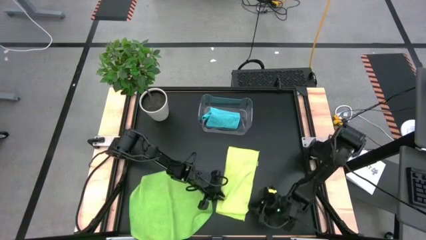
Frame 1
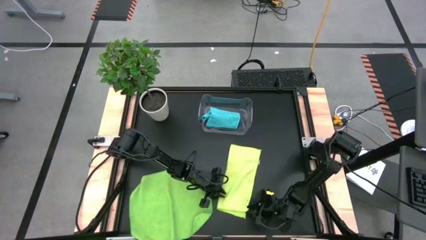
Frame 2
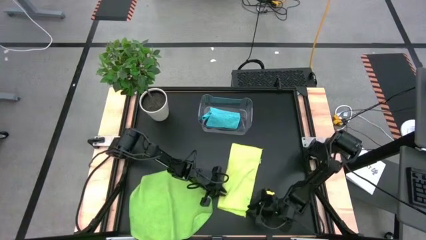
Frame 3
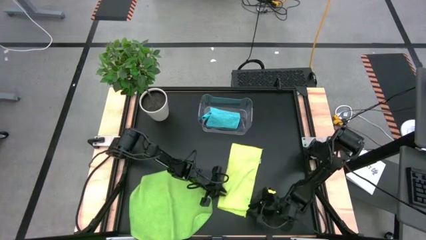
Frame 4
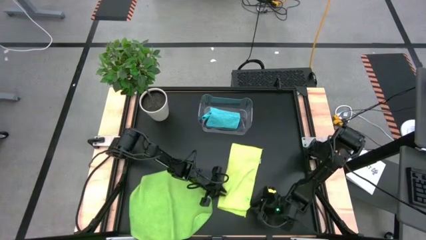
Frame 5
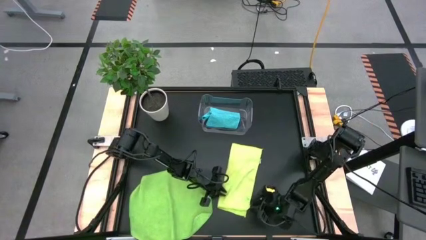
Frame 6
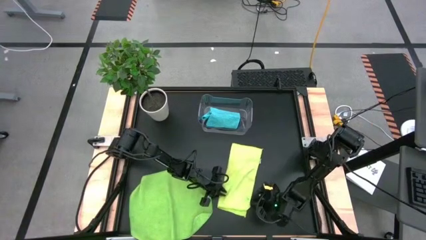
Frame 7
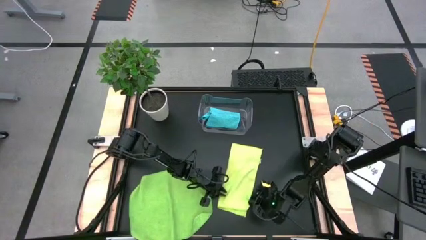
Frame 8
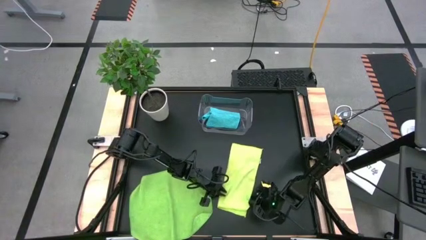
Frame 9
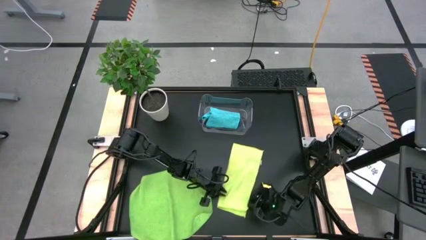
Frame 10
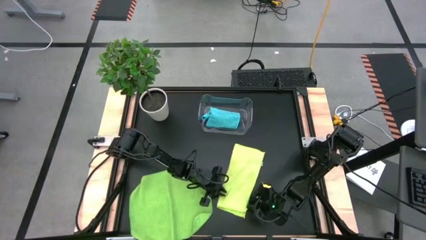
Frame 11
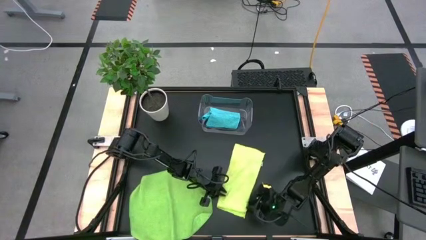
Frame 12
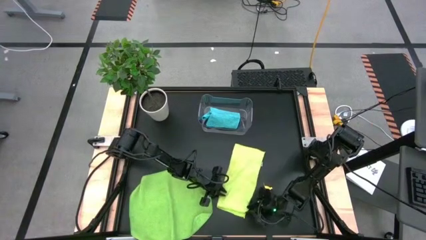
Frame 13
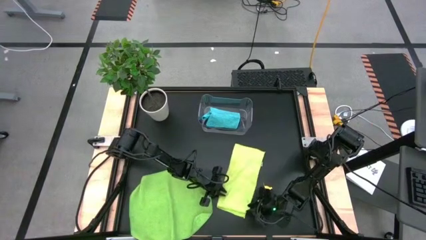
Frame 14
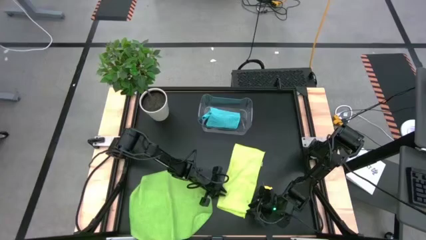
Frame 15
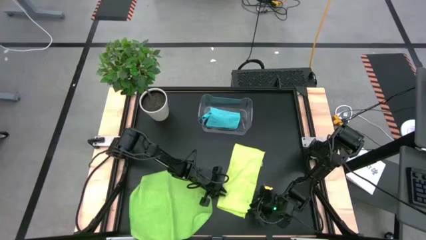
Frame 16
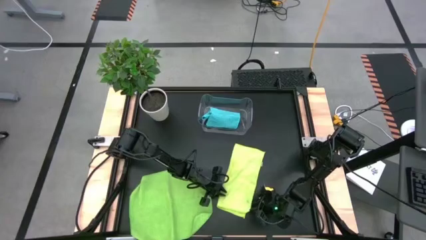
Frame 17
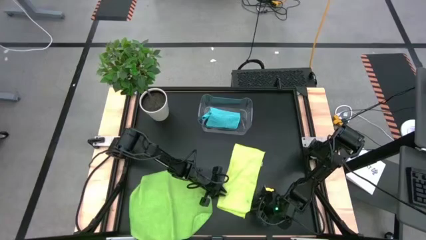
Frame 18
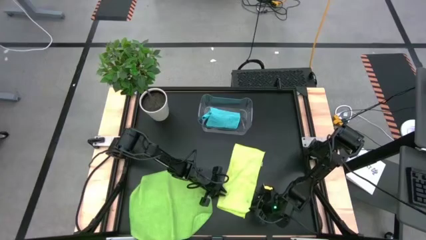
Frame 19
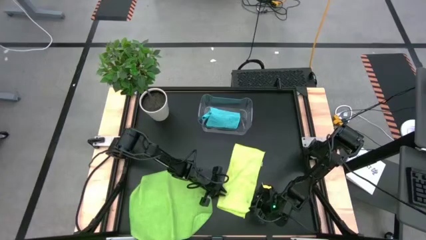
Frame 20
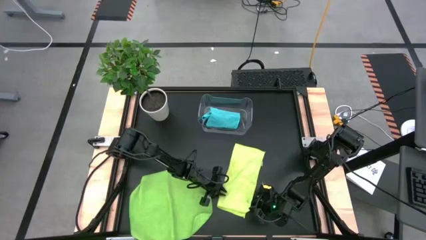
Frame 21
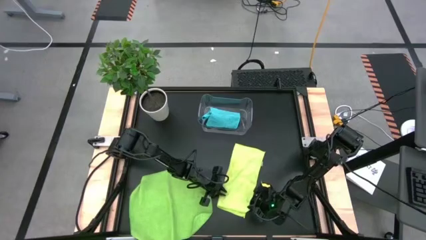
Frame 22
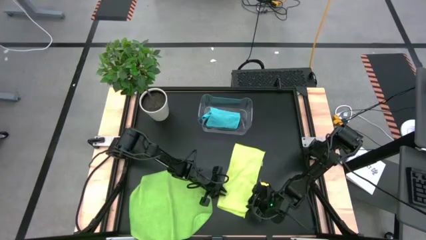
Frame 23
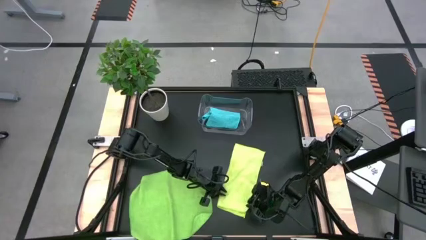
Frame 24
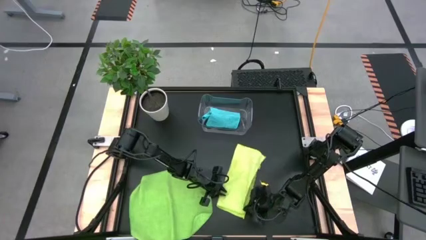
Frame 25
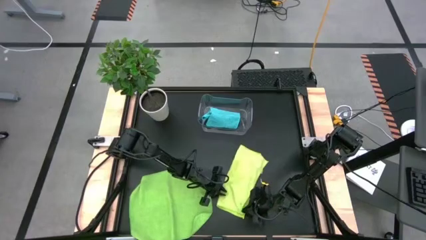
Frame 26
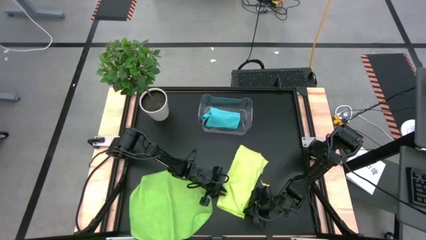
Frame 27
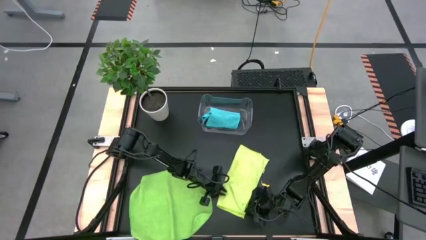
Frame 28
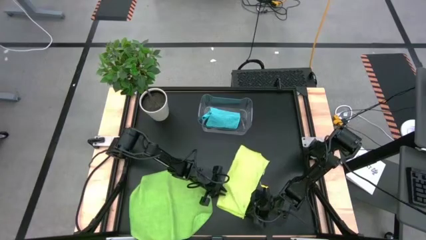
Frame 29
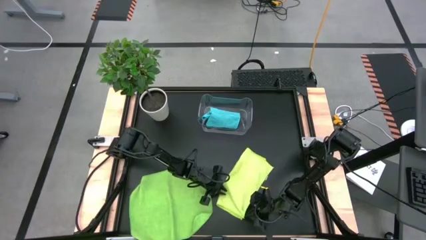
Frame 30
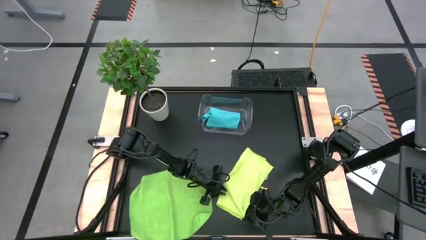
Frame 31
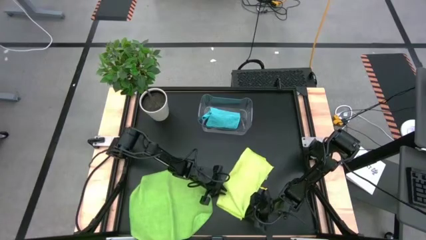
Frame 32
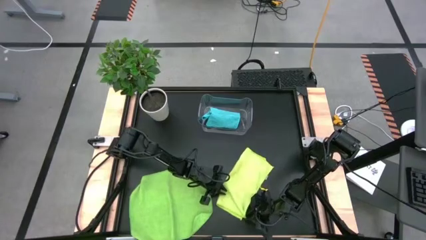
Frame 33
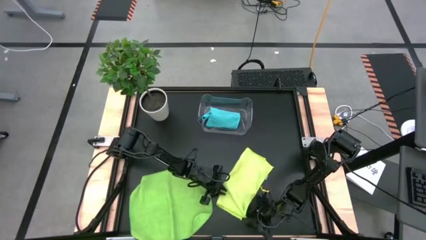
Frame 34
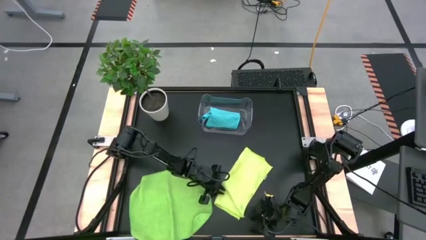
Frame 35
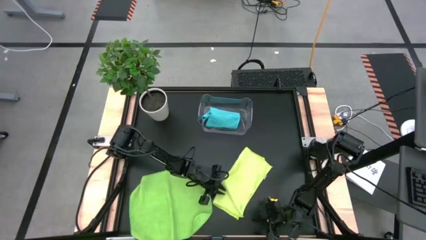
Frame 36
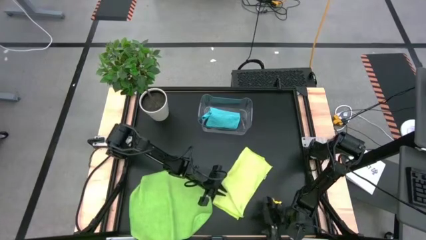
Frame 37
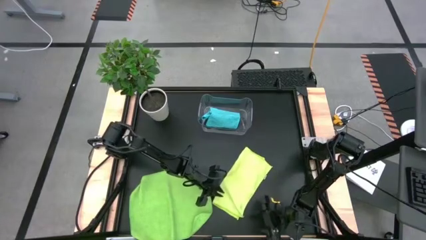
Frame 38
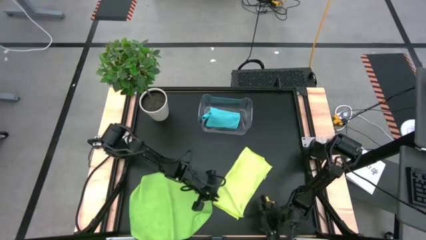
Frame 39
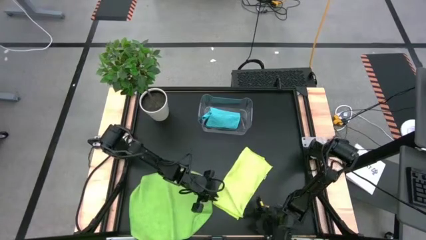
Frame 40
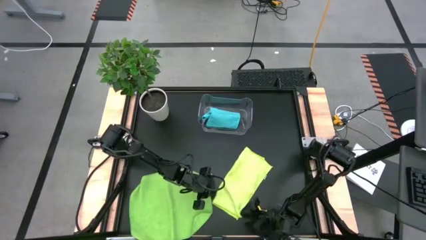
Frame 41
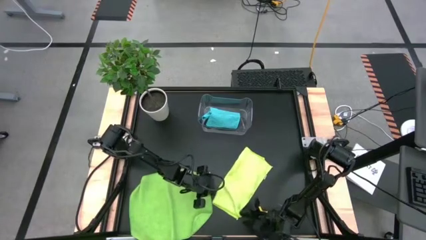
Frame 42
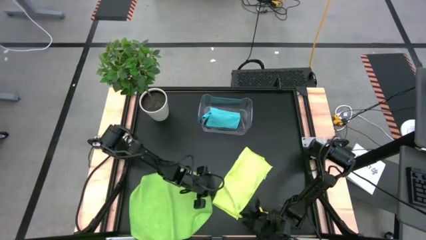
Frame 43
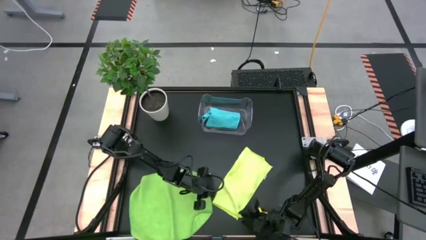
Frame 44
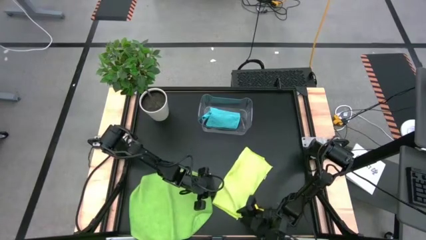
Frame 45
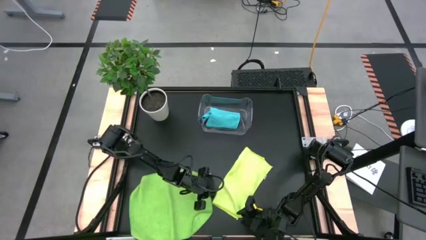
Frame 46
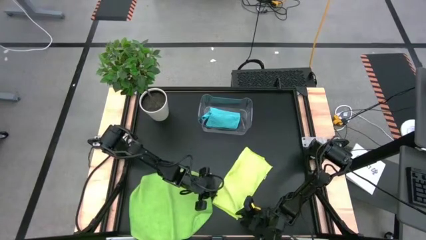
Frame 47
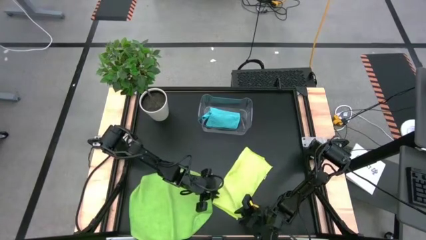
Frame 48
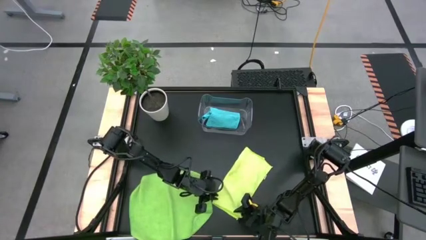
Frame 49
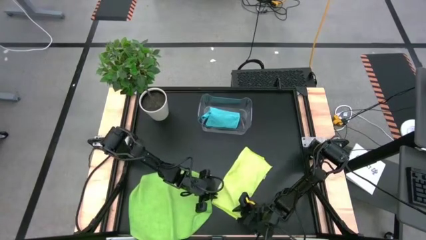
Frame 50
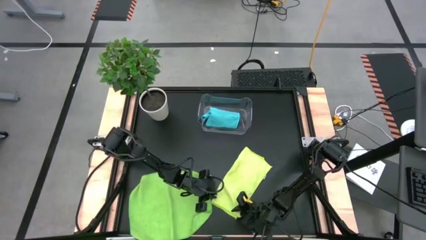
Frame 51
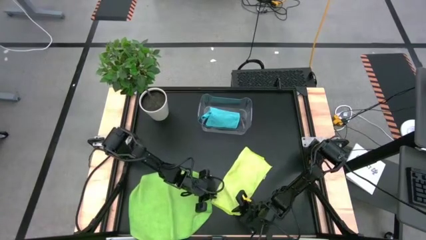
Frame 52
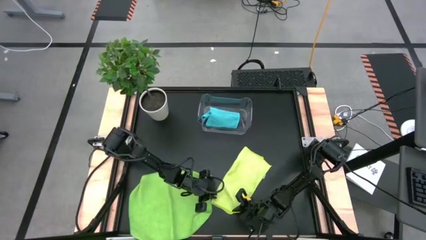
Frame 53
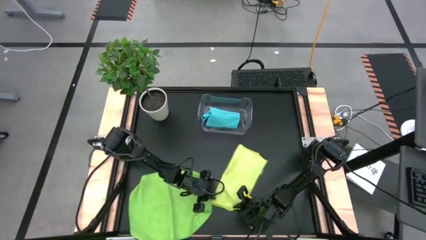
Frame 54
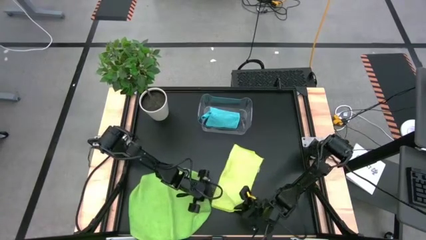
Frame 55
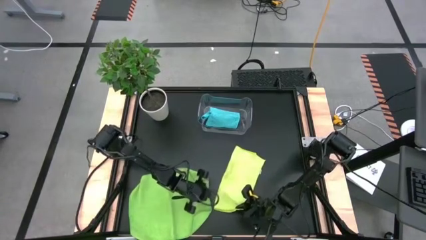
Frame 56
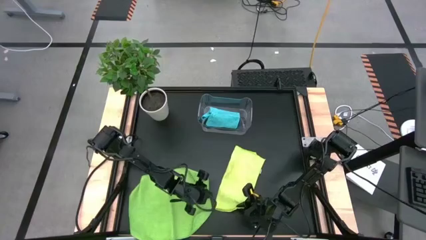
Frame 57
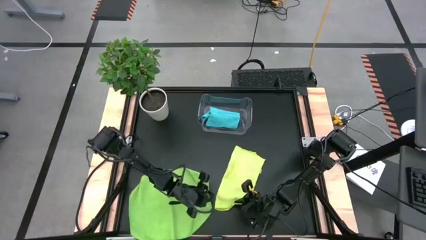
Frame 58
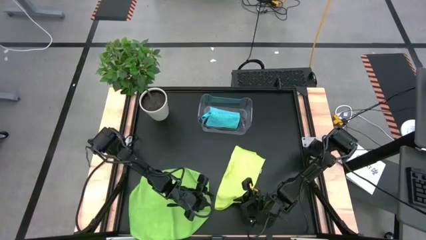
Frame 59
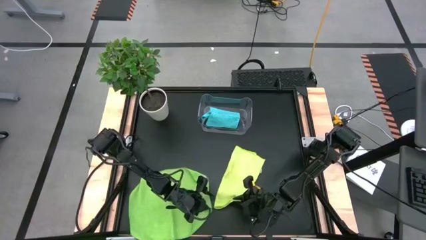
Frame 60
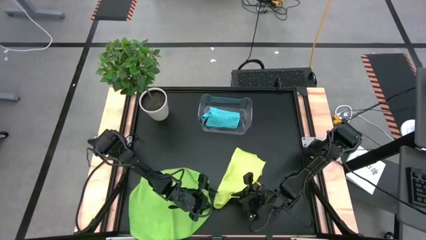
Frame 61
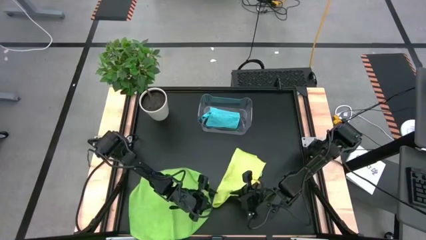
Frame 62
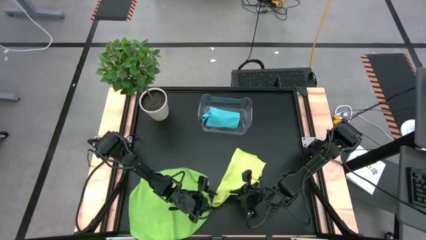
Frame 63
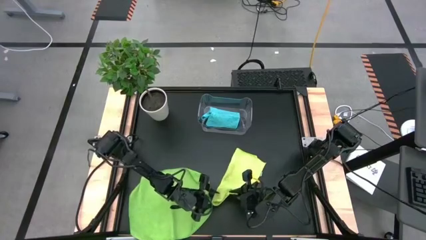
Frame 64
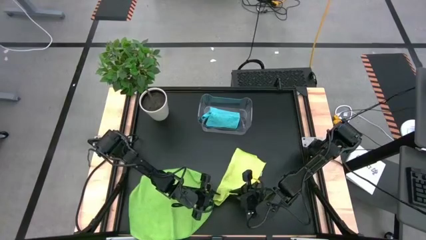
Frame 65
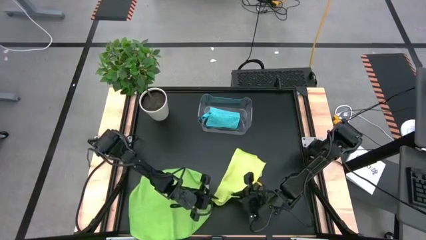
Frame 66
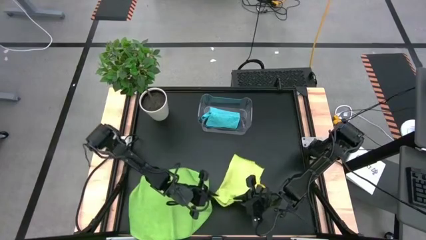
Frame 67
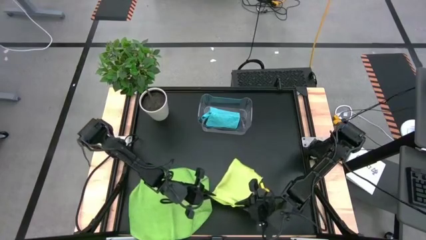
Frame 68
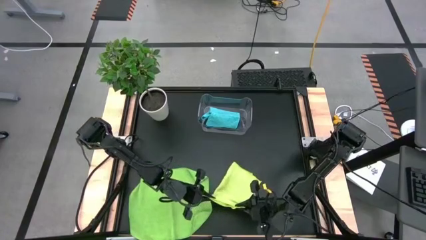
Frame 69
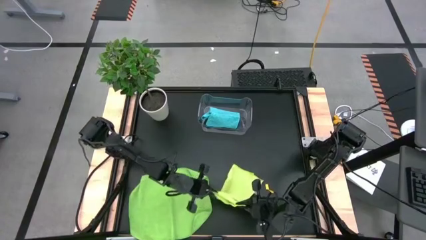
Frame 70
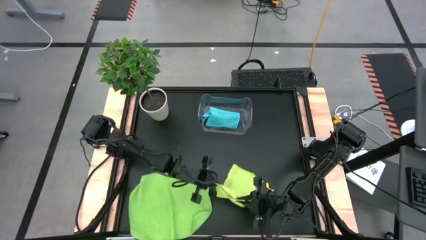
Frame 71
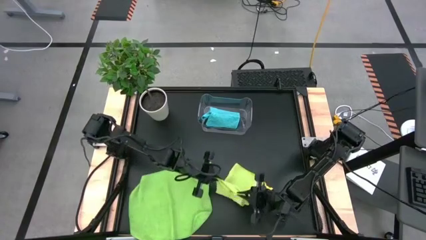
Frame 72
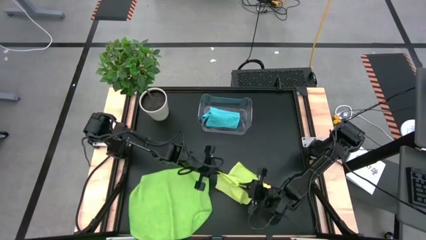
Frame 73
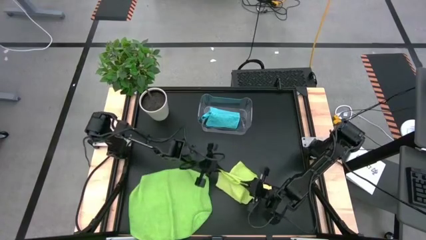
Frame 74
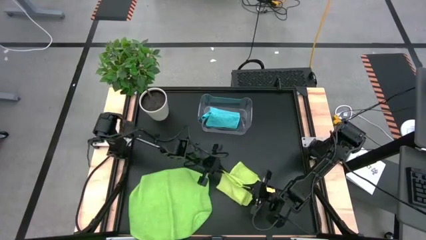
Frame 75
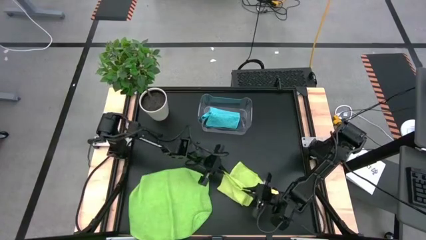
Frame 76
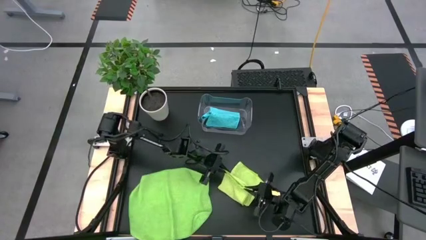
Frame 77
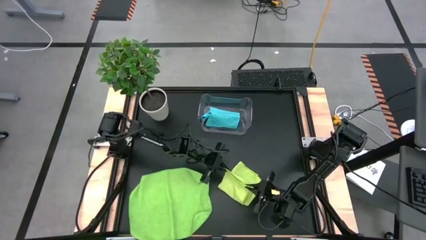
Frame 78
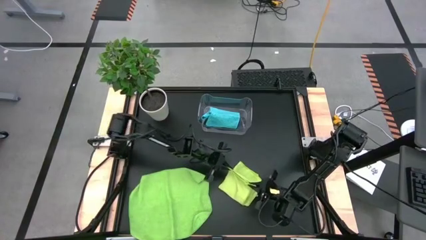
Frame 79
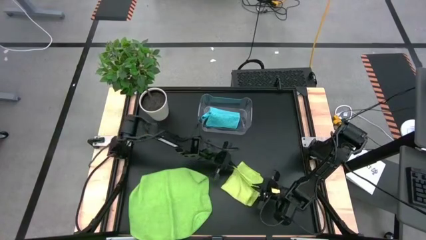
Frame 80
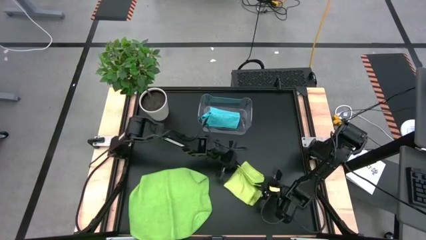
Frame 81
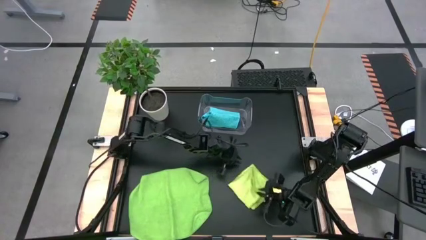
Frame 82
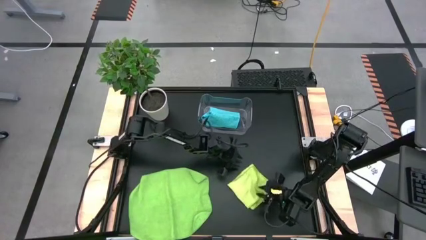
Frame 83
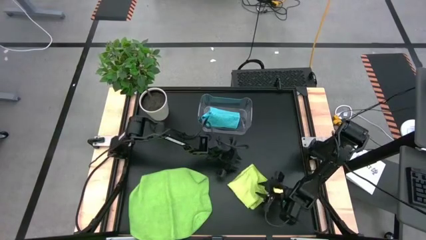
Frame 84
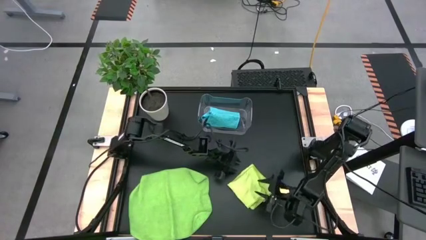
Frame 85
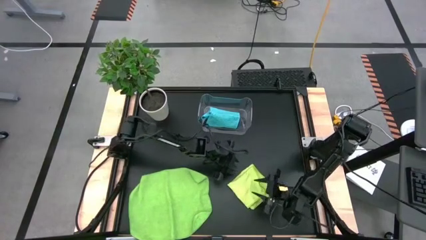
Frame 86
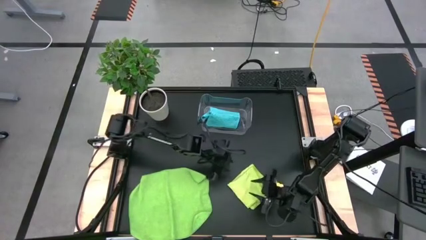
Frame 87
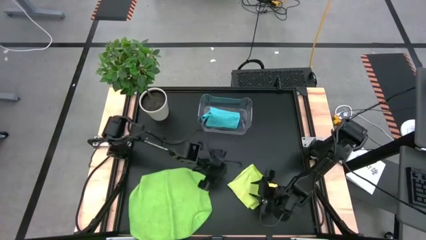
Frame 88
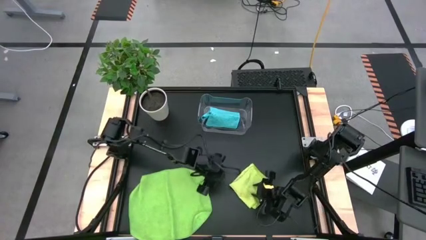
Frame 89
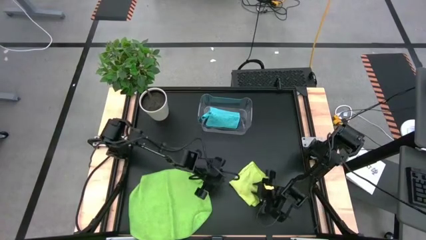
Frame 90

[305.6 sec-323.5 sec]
Task: Fold microfiber towels
Fold the light green towel
